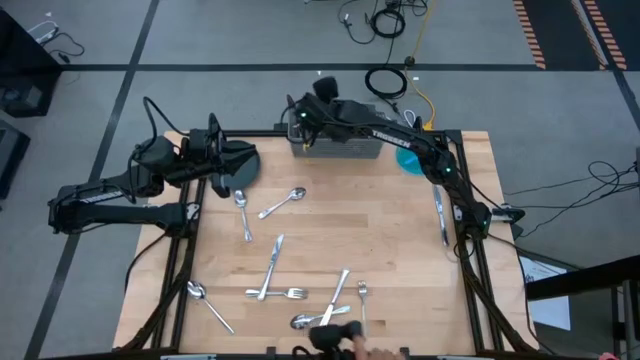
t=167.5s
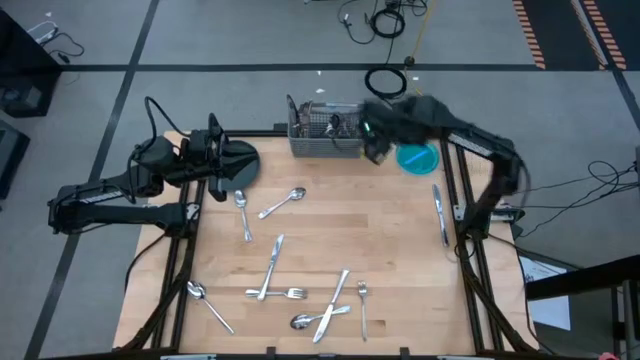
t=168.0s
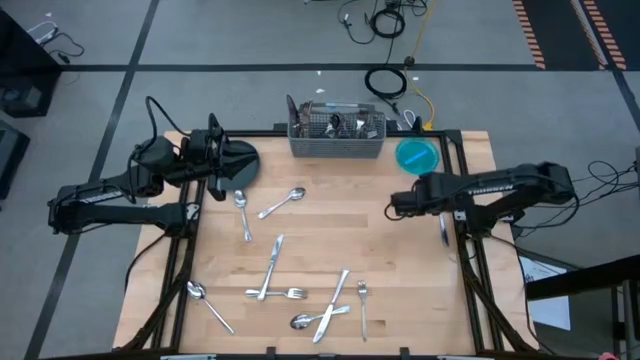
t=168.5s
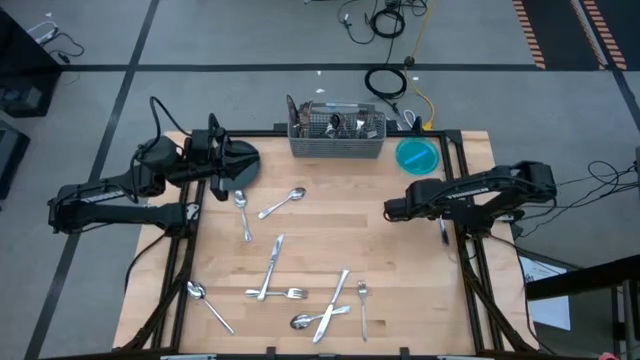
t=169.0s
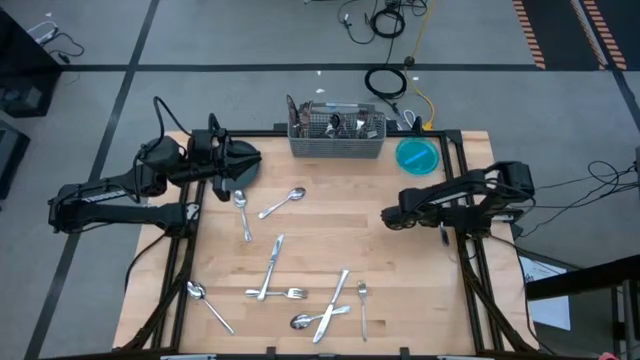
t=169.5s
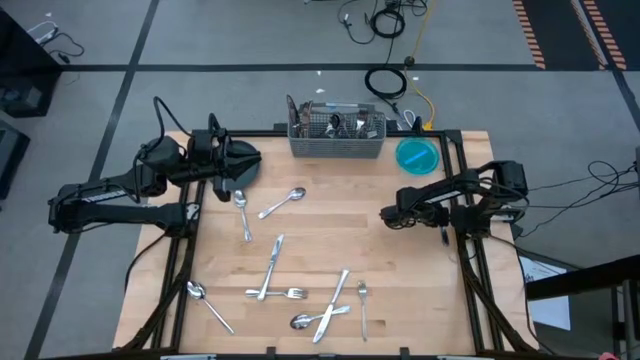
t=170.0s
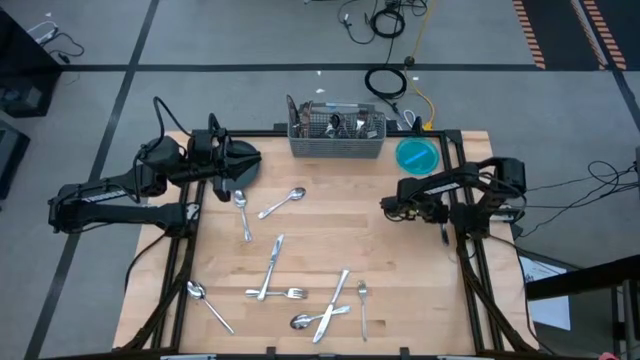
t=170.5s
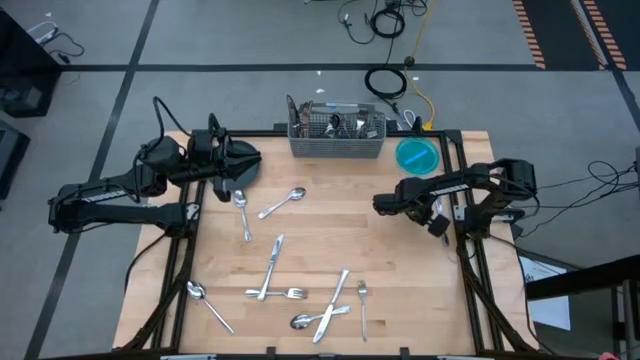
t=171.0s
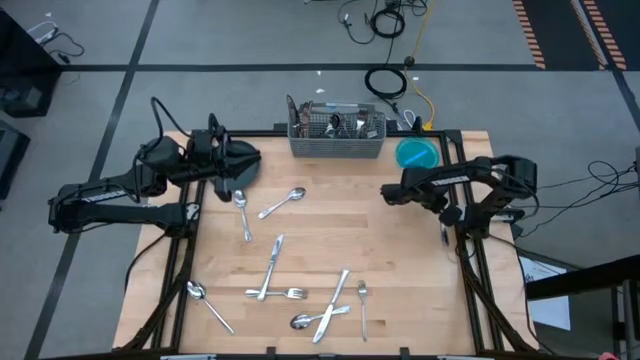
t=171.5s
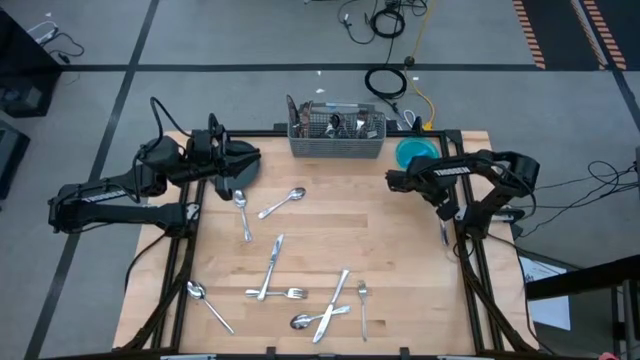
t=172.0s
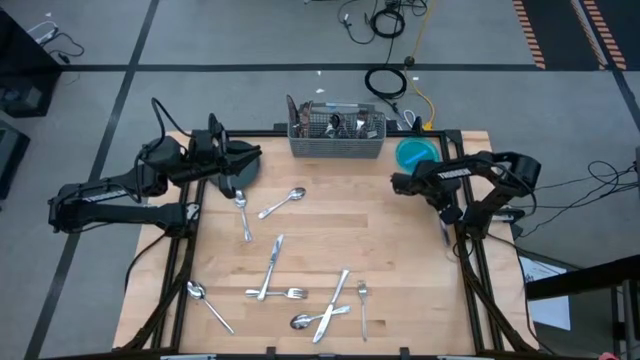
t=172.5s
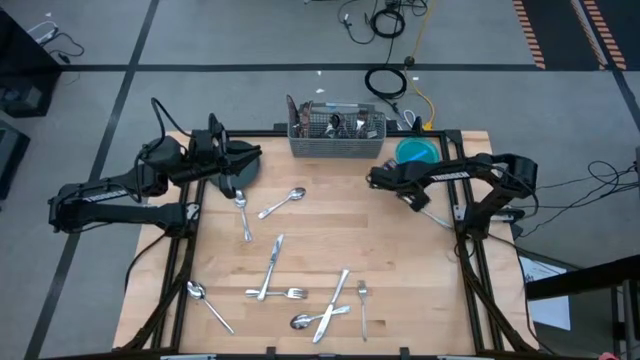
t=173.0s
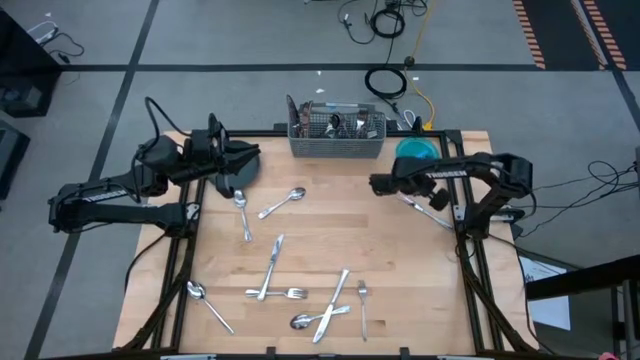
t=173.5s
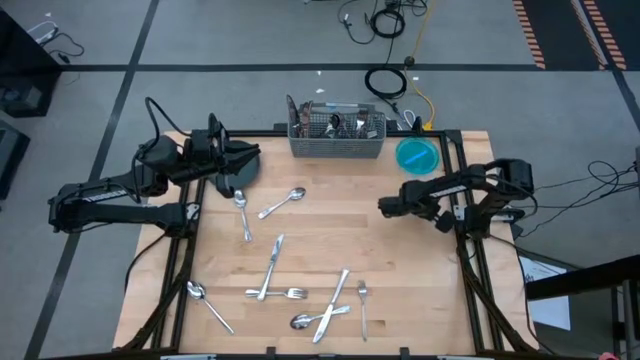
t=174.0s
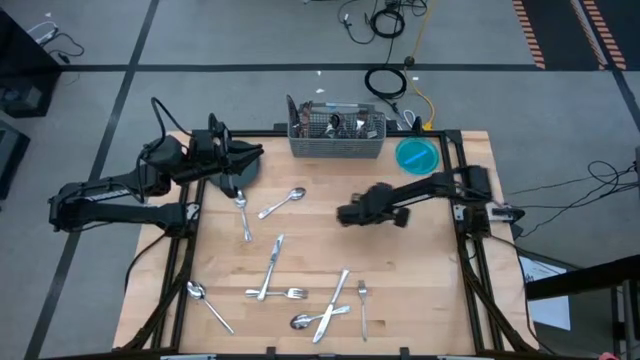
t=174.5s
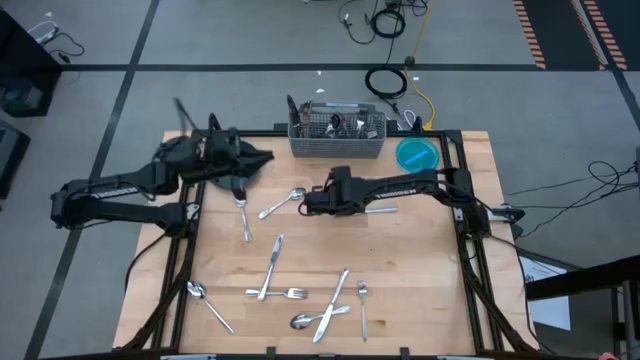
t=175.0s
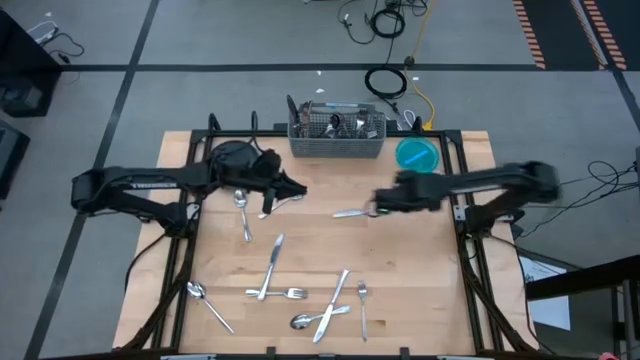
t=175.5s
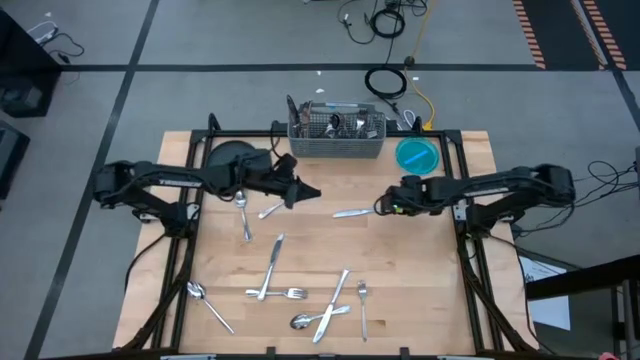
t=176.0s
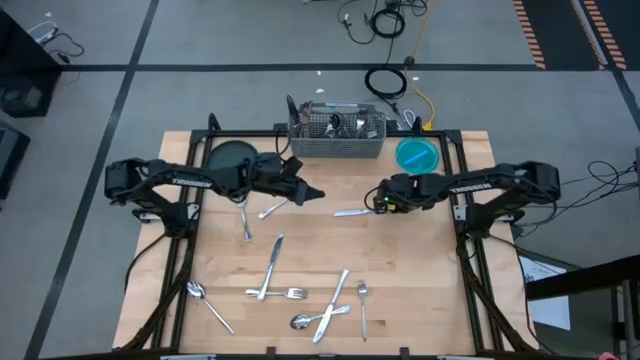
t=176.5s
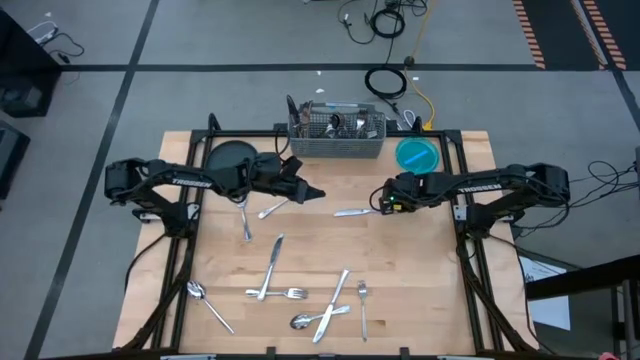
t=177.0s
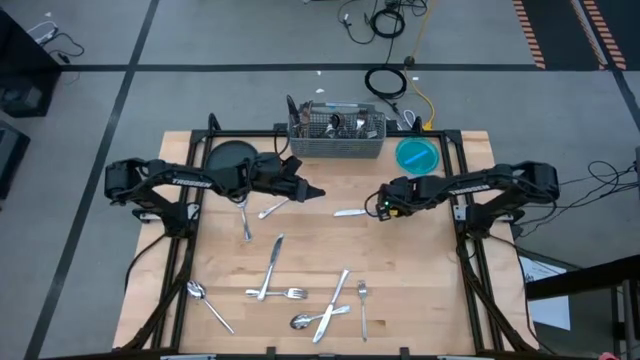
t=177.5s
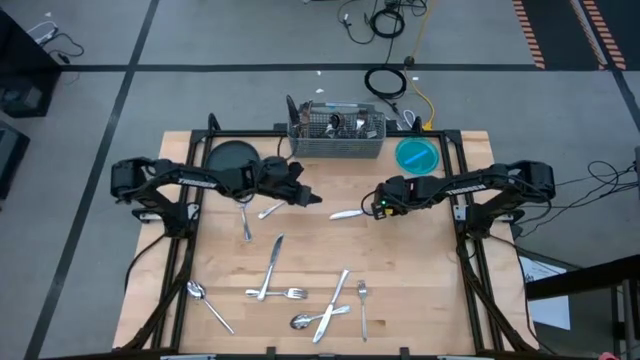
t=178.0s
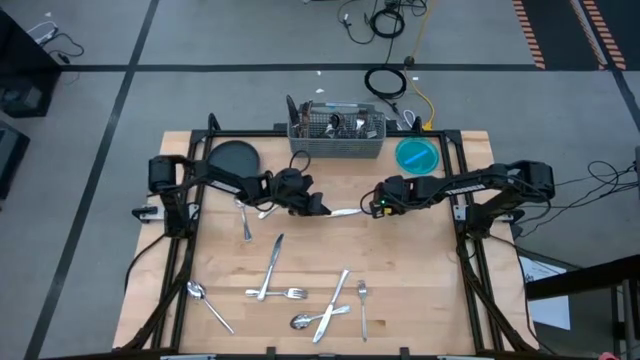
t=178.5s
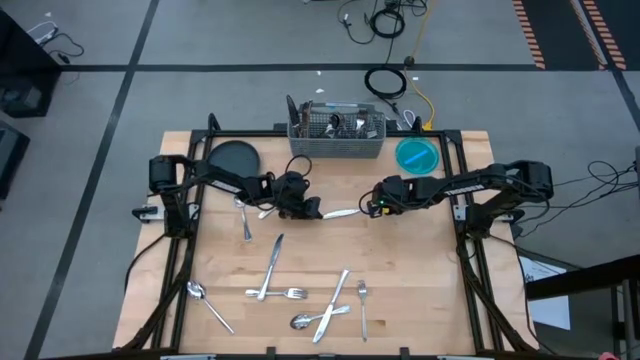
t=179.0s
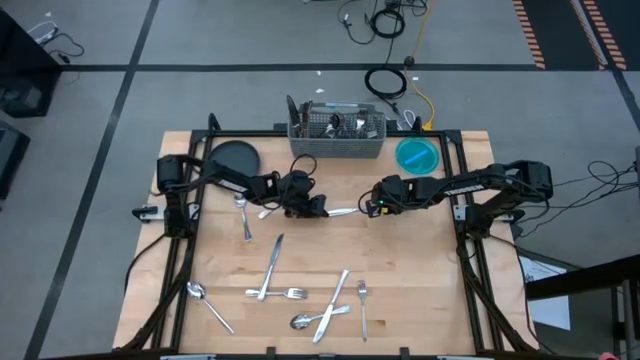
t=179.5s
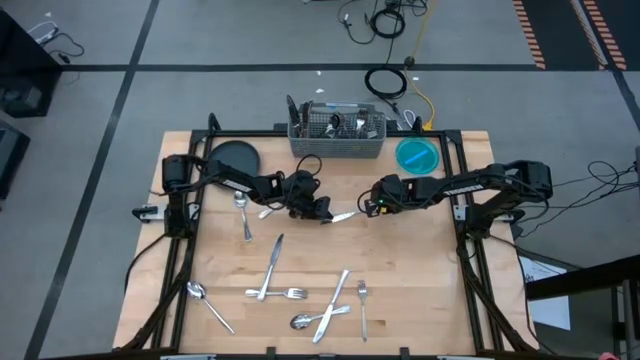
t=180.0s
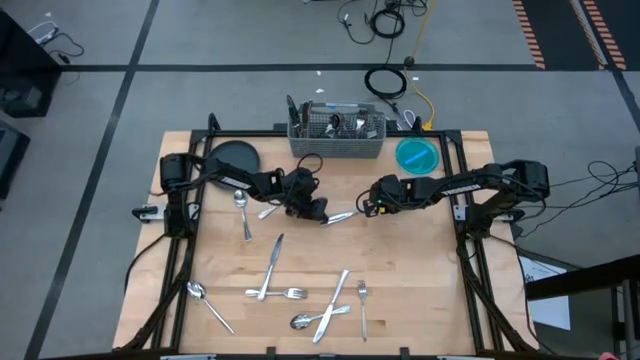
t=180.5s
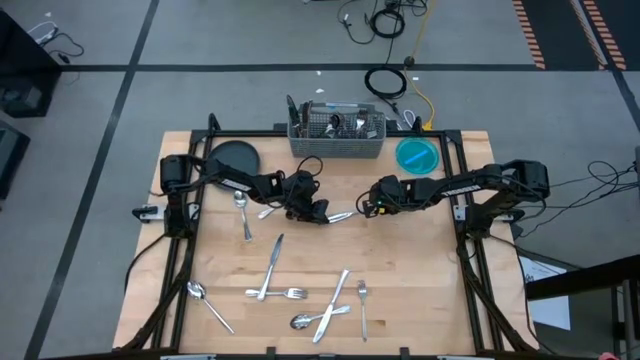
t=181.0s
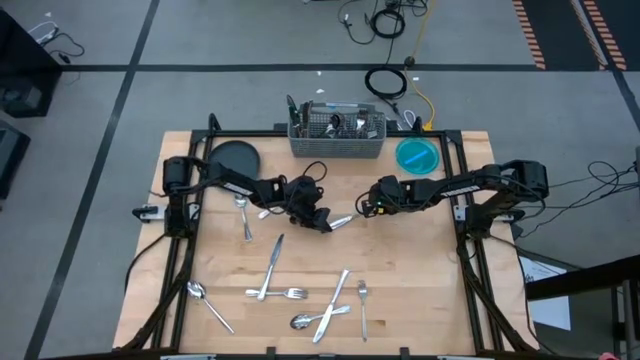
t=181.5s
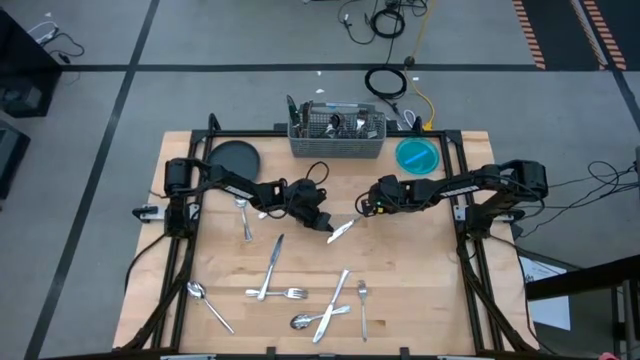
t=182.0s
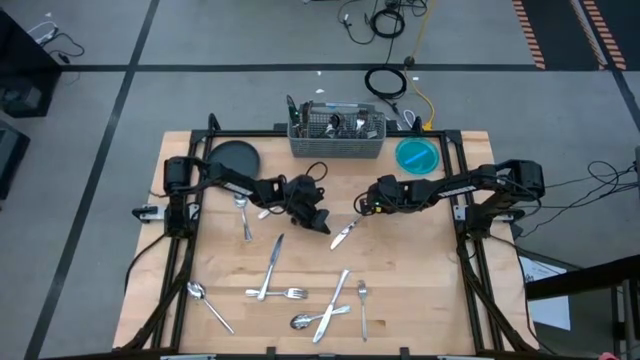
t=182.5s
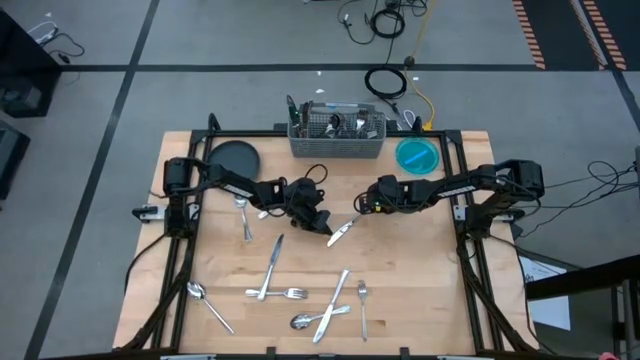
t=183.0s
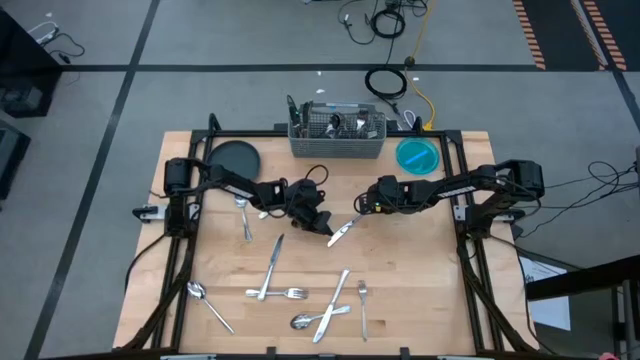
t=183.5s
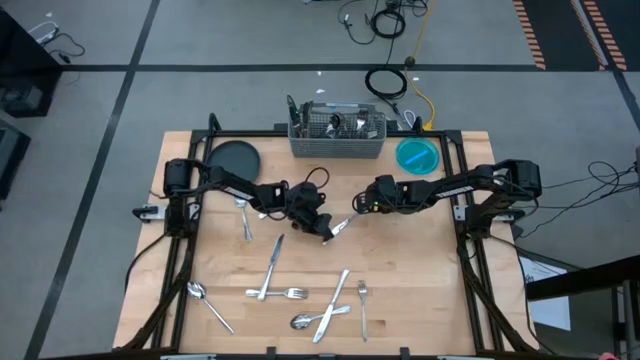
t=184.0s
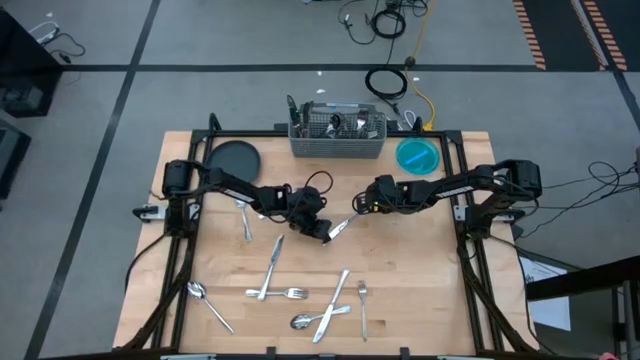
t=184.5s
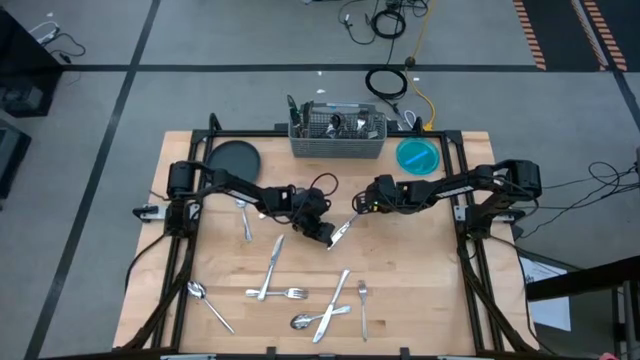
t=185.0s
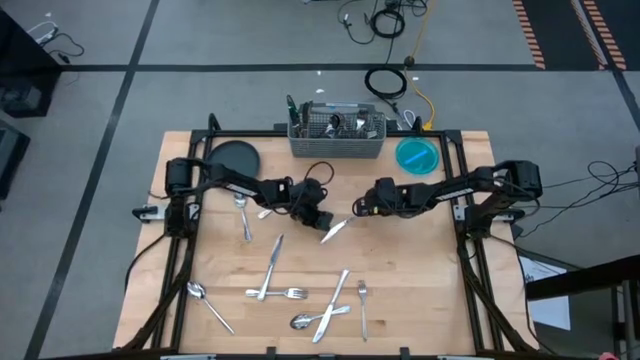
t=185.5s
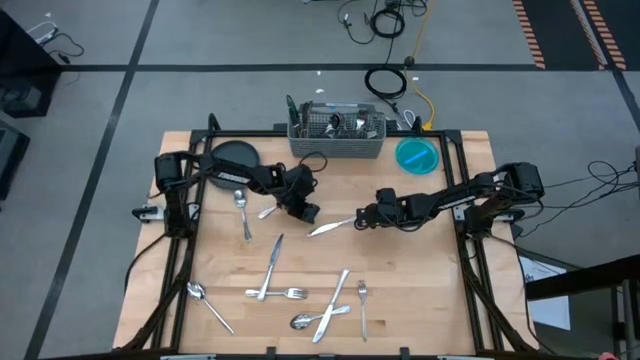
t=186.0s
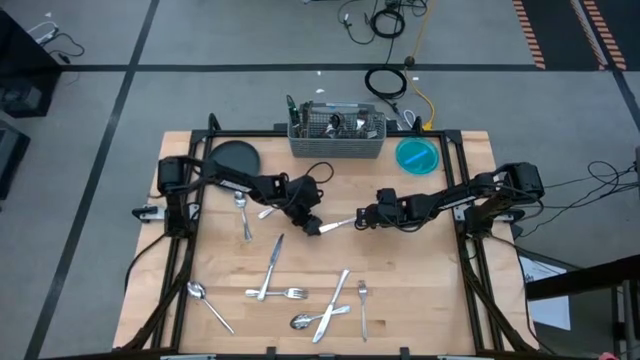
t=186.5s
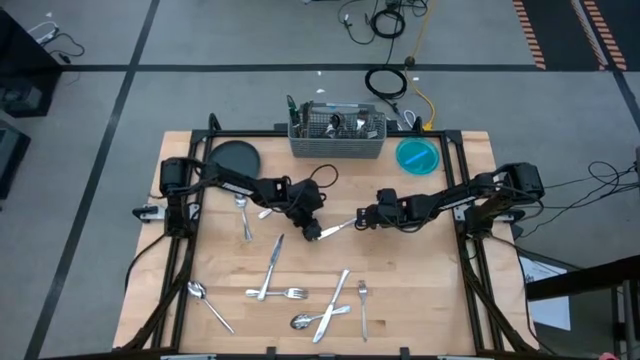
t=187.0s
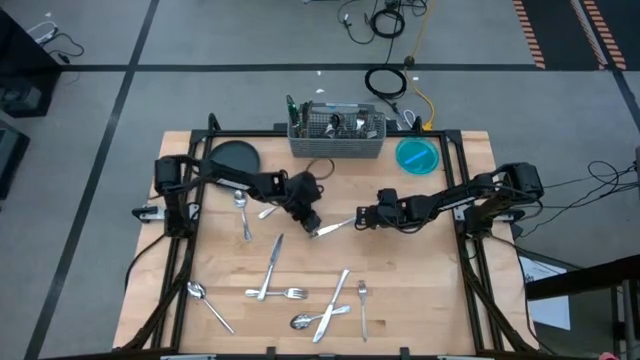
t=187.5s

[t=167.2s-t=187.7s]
Task: Sort silverware
Put the table knife into the silverware organizer
